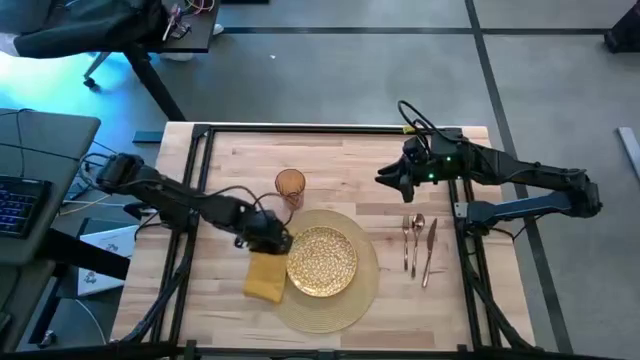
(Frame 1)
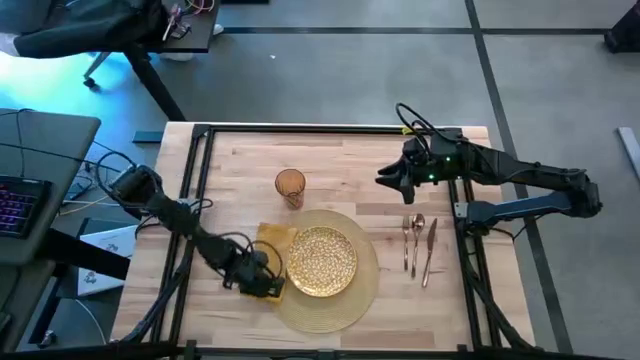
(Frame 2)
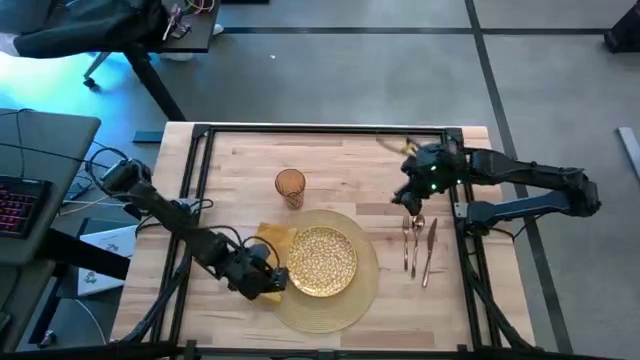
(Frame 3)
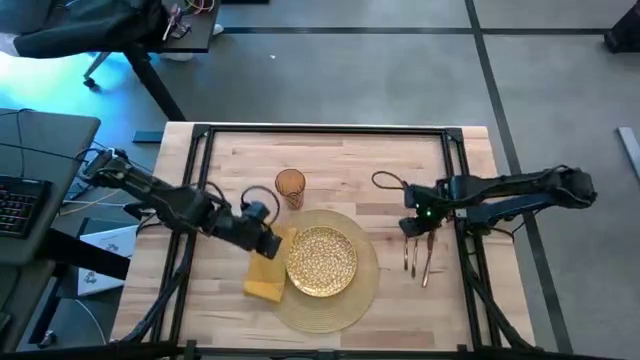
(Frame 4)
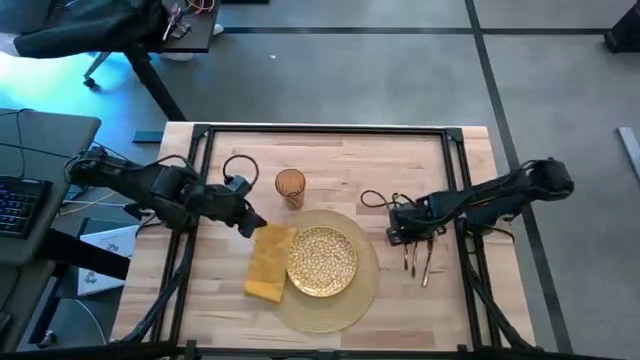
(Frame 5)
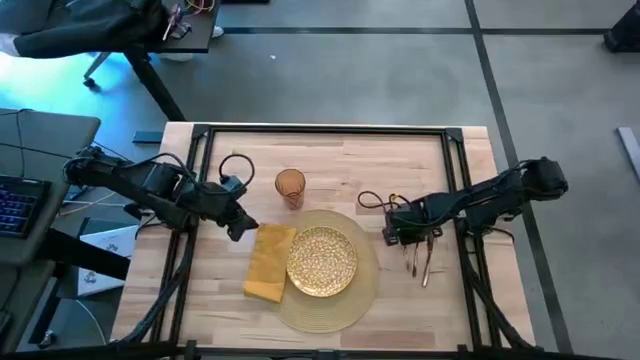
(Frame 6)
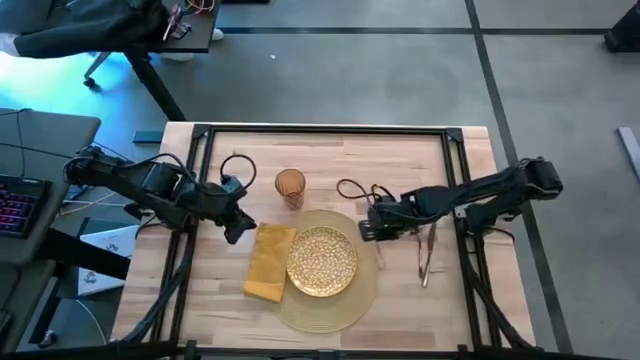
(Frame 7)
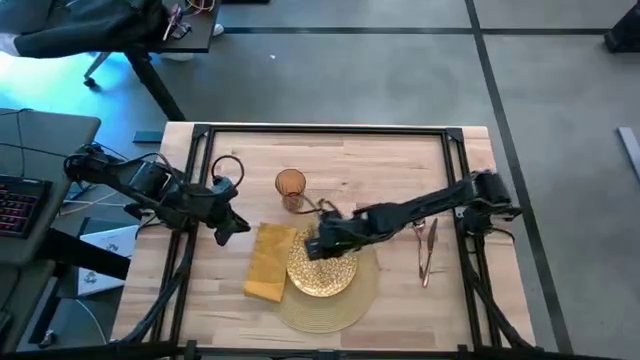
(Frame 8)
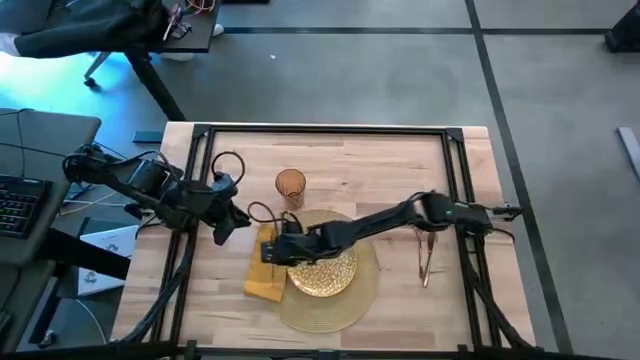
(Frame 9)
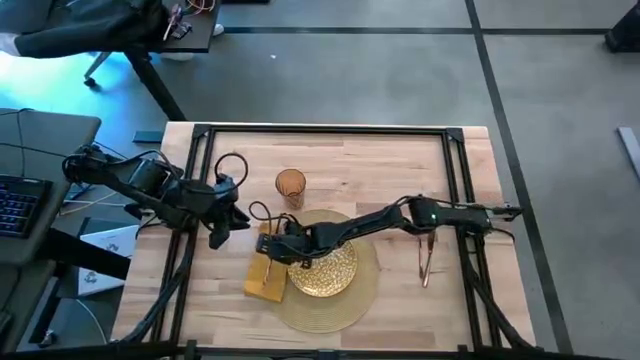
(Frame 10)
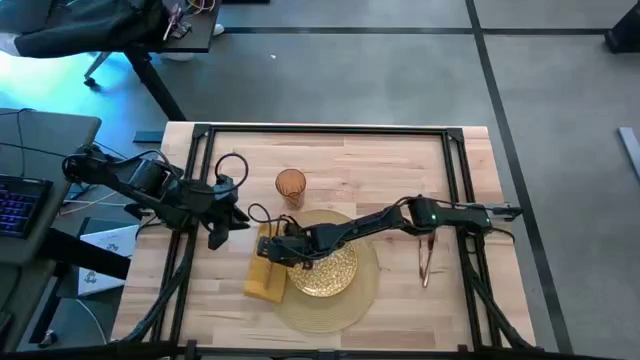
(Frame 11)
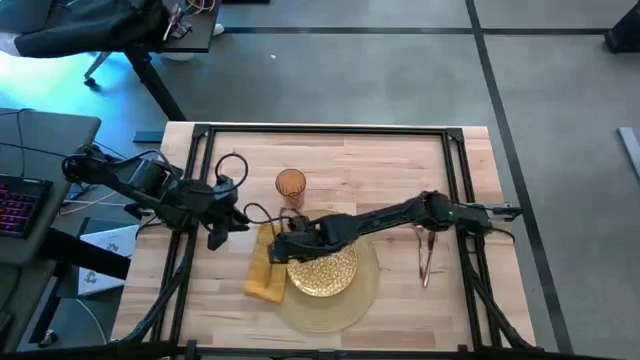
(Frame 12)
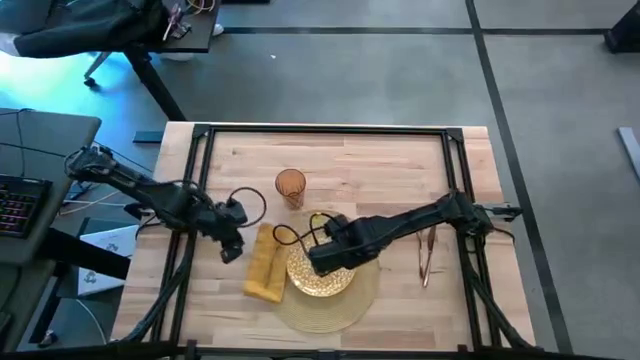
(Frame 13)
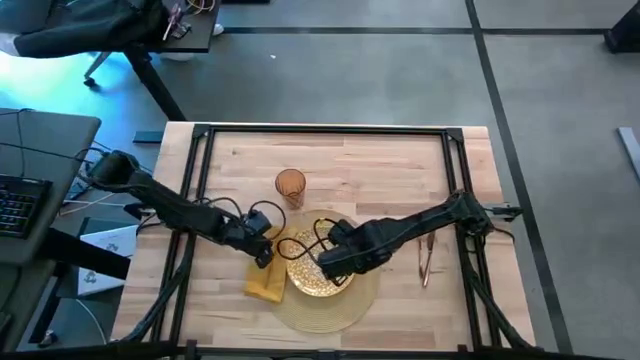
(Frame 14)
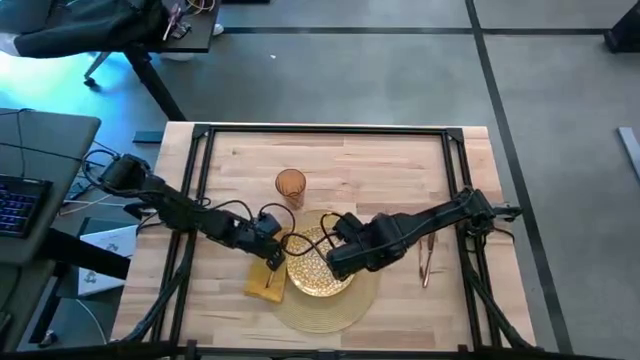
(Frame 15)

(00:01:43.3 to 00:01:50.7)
Task: Set table place
Put the brown fork on top of the yellow table napkin

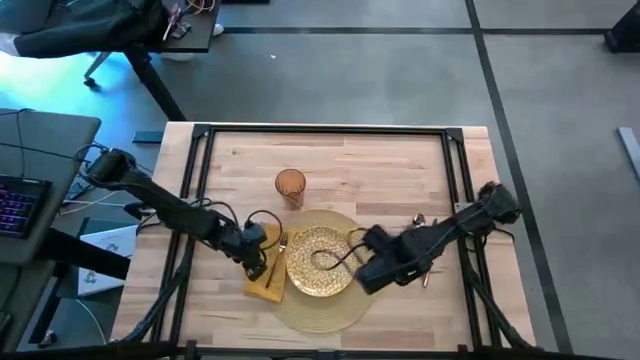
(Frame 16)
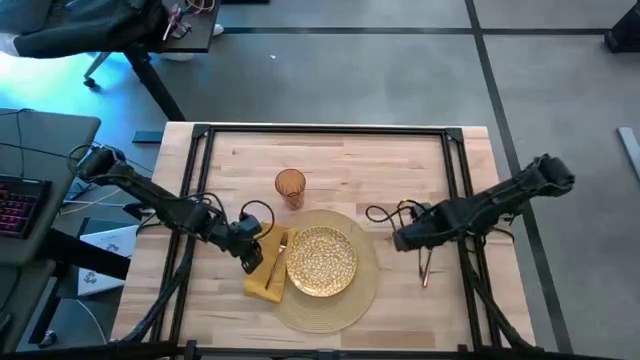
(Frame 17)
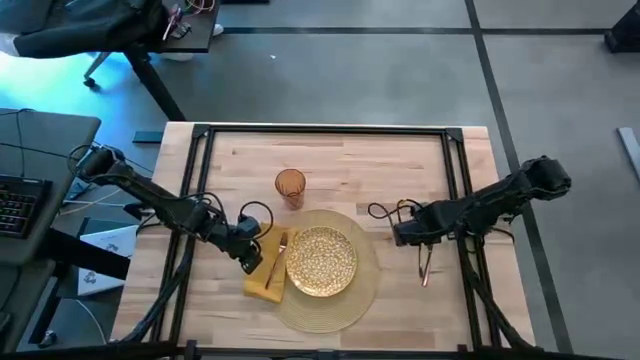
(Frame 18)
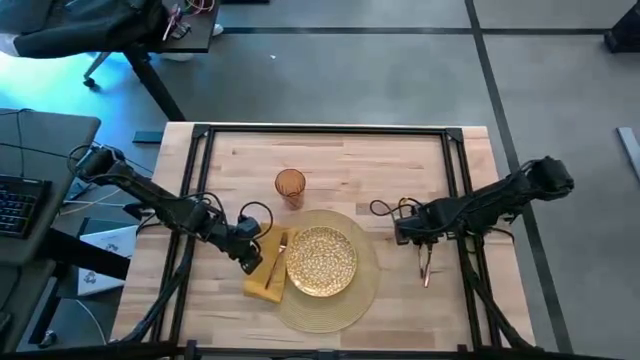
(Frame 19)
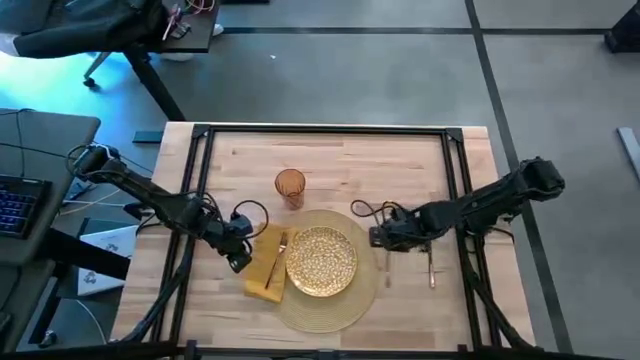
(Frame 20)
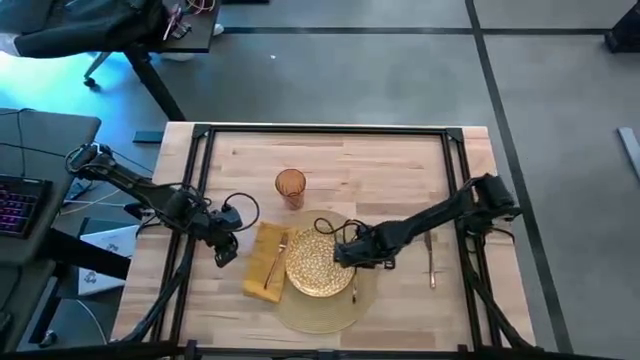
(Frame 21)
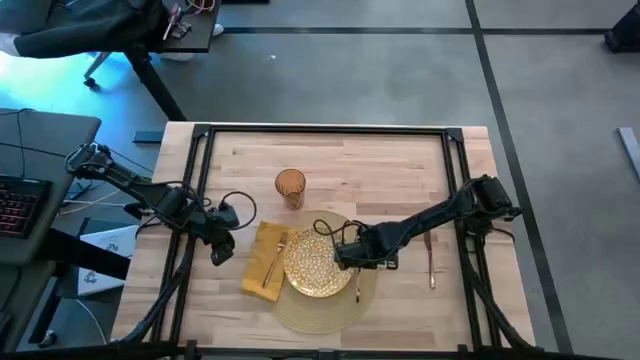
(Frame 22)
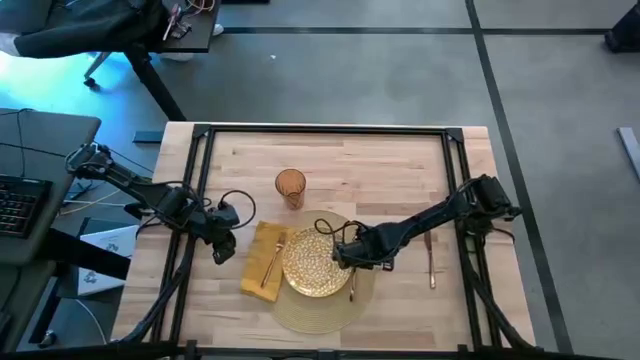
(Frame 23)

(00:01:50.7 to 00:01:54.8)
Put the brown spoon on the yellow tablemat to the right of the yellow plate

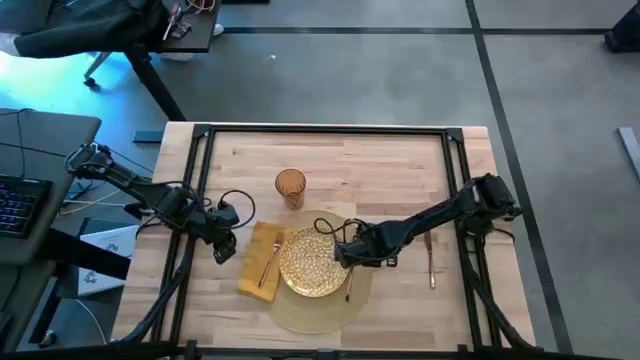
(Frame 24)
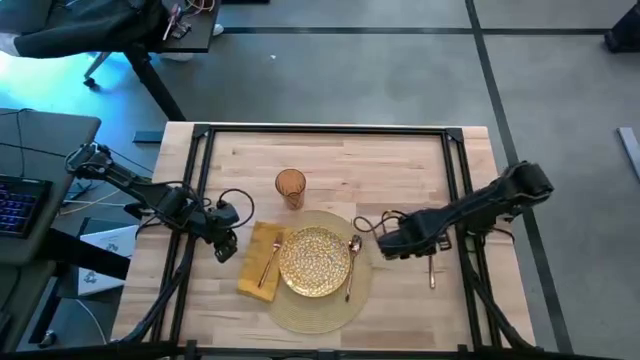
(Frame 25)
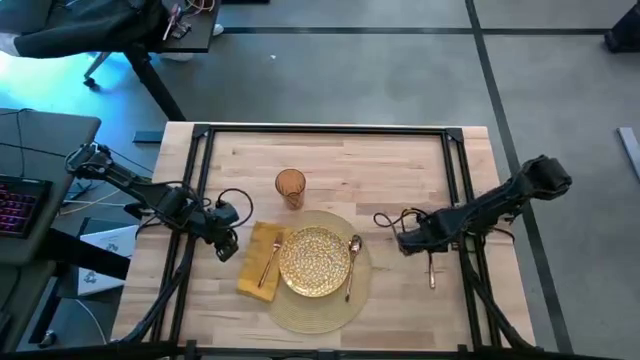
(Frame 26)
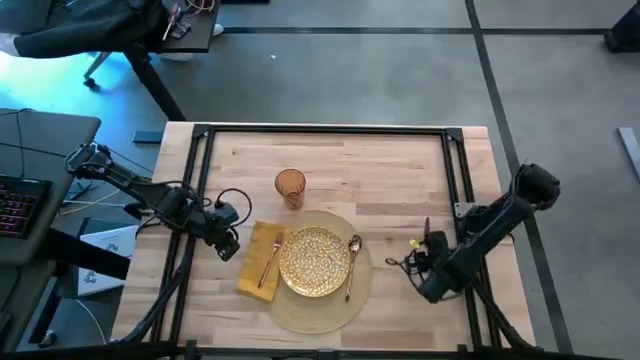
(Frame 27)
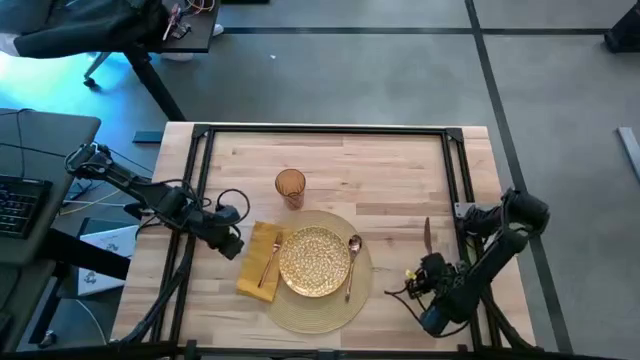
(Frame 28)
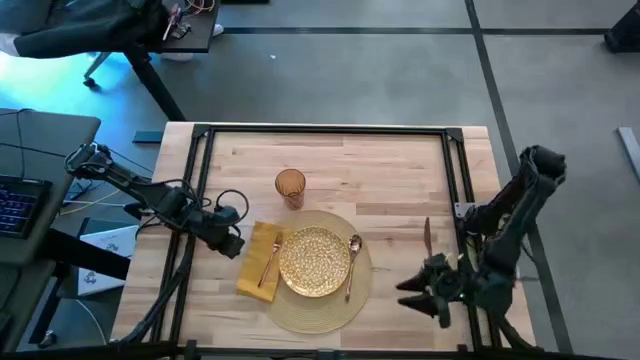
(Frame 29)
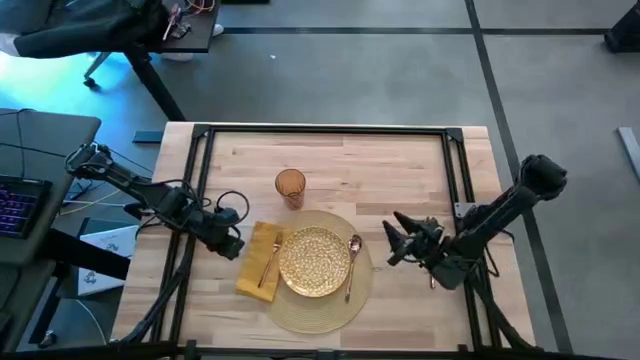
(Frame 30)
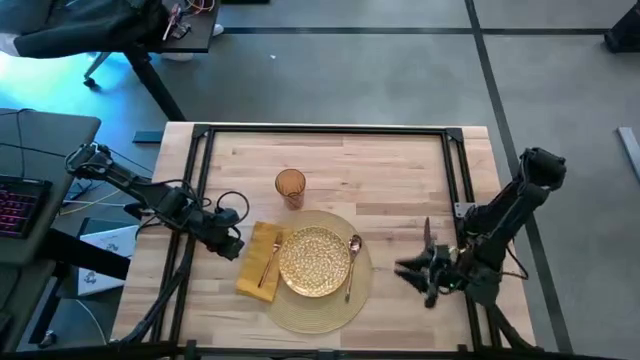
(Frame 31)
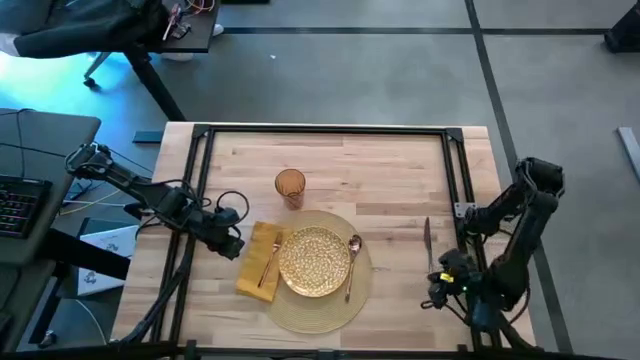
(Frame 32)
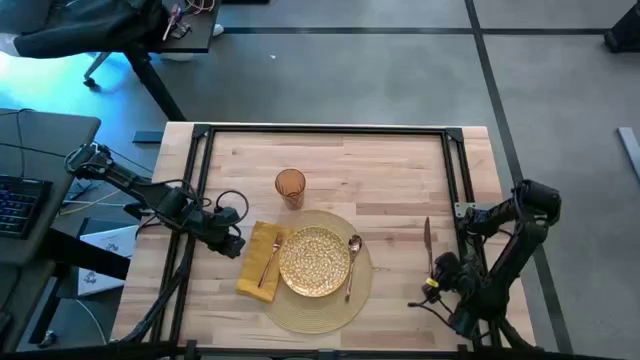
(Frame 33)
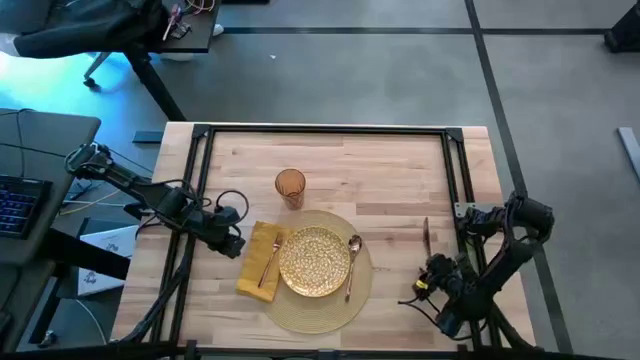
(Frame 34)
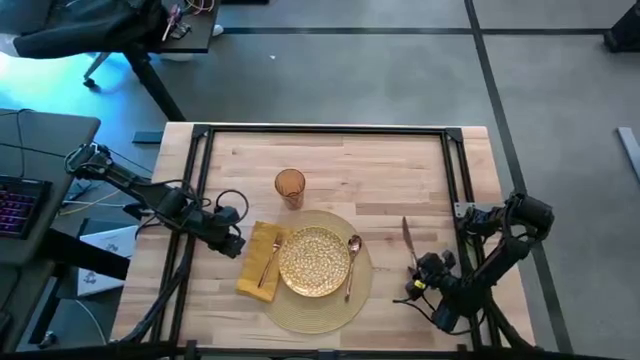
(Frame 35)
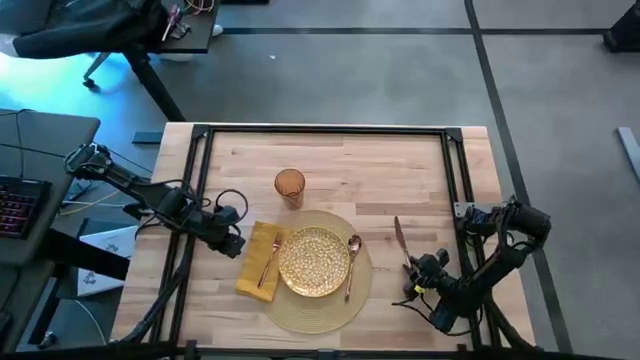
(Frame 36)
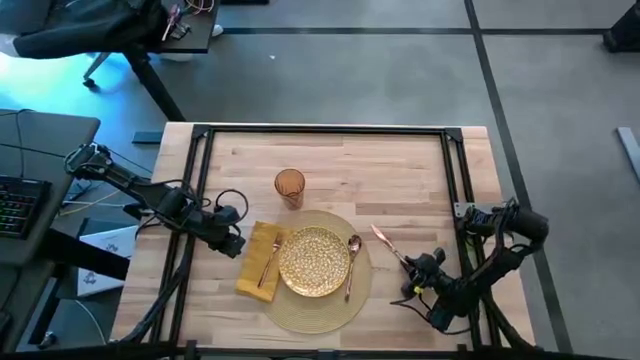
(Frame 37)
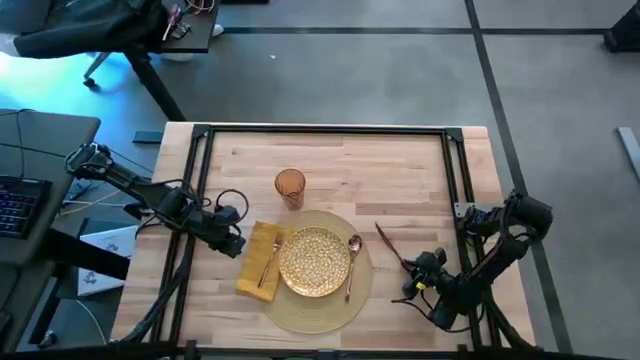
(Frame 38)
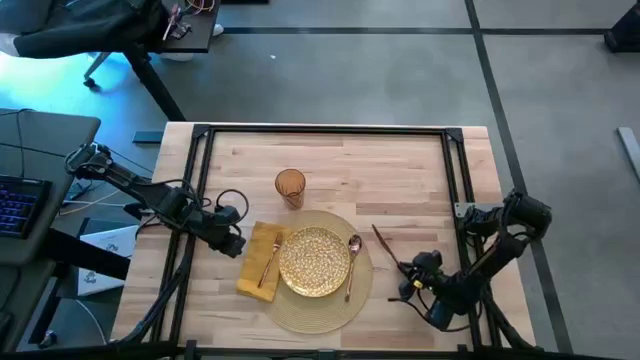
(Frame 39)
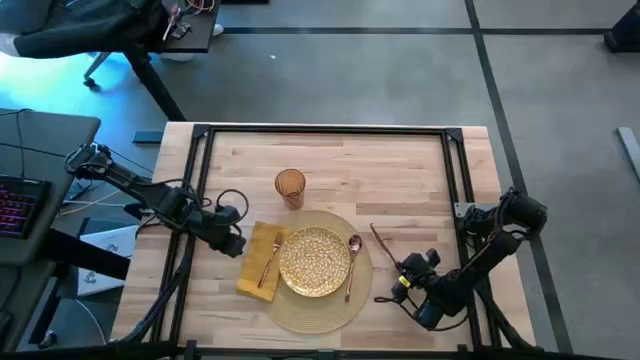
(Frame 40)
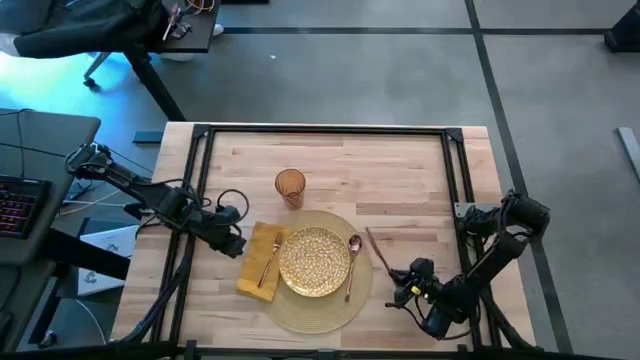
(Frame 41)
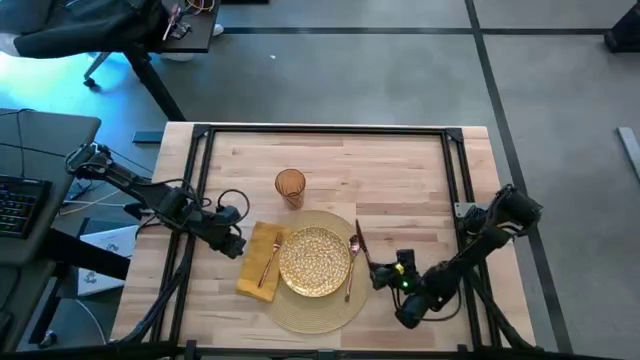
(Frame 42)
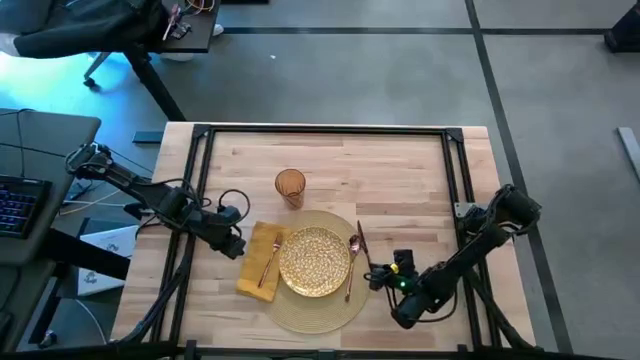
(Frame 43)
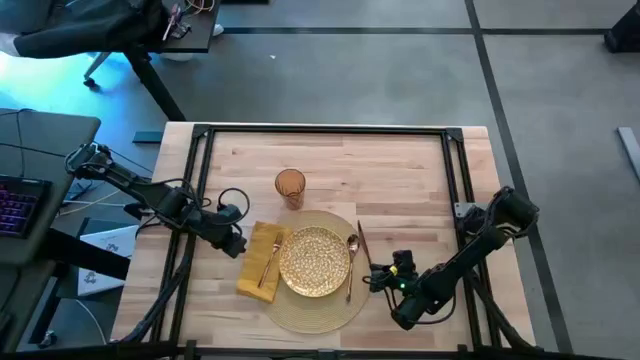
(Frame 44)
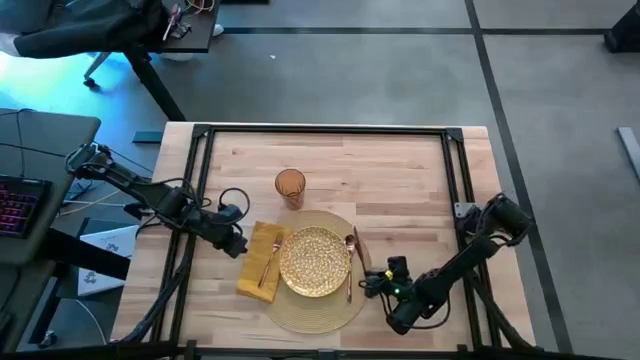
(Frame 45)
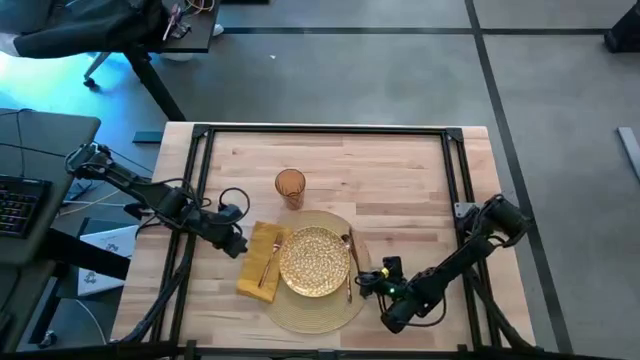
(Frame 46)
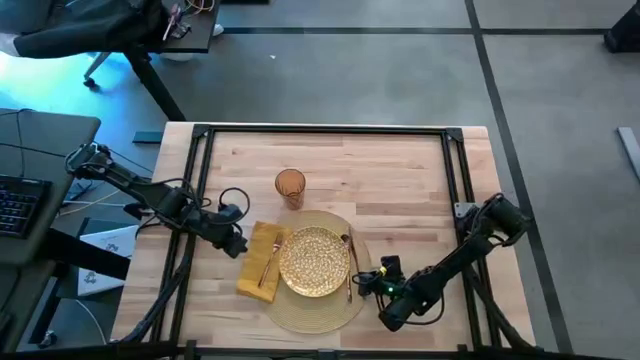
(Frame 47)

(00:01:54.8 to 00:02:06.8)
Put the brown table knife on the yellow tablemat to the right of the brown spoon
